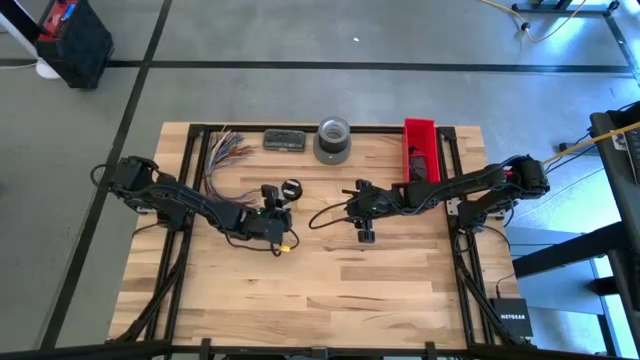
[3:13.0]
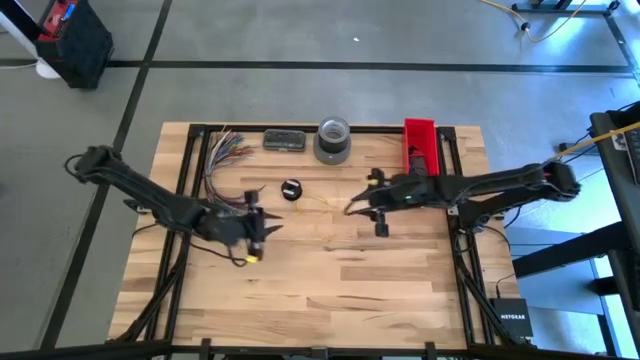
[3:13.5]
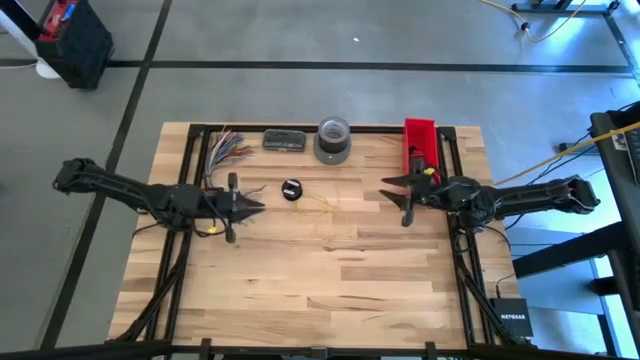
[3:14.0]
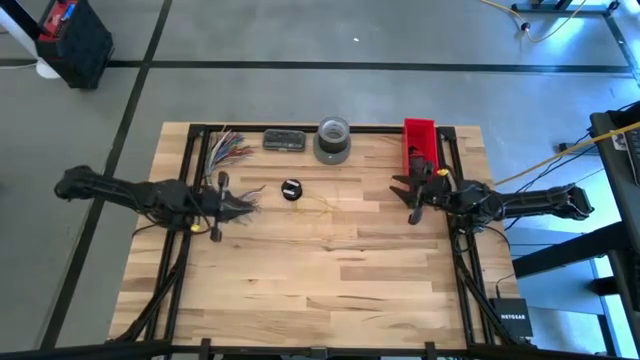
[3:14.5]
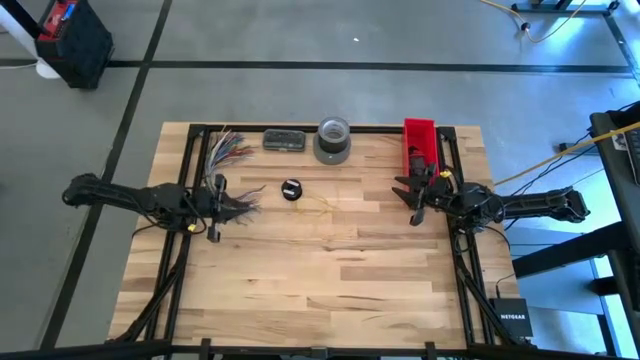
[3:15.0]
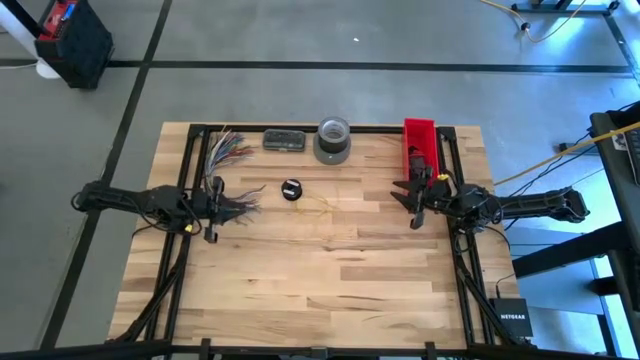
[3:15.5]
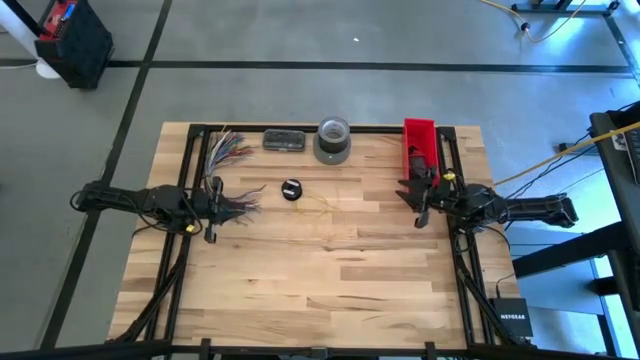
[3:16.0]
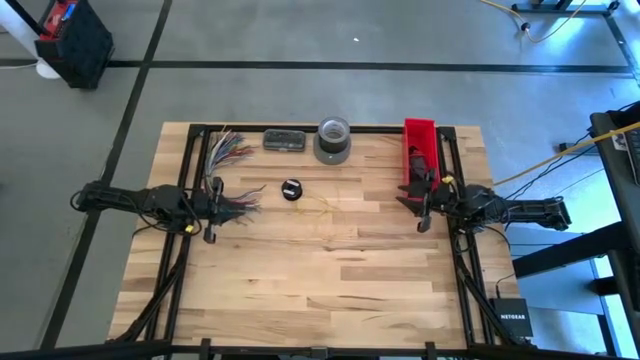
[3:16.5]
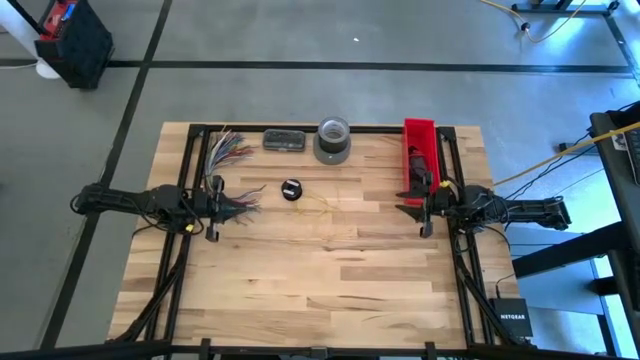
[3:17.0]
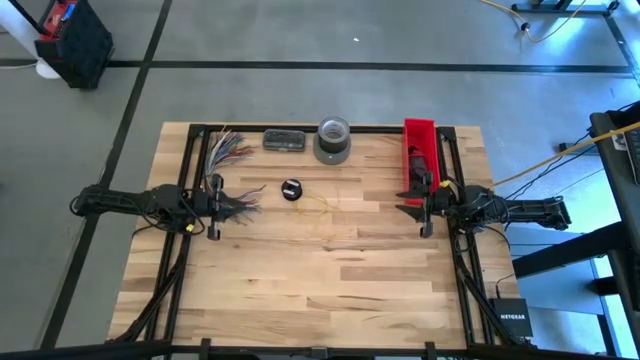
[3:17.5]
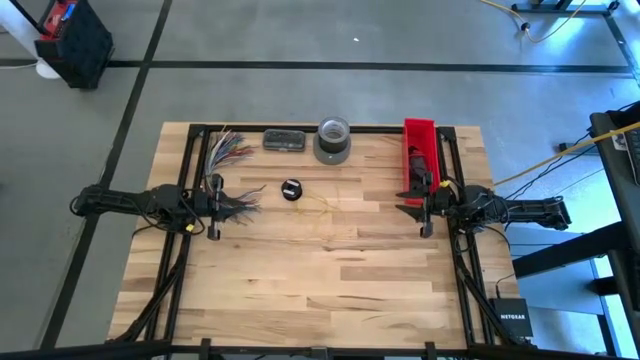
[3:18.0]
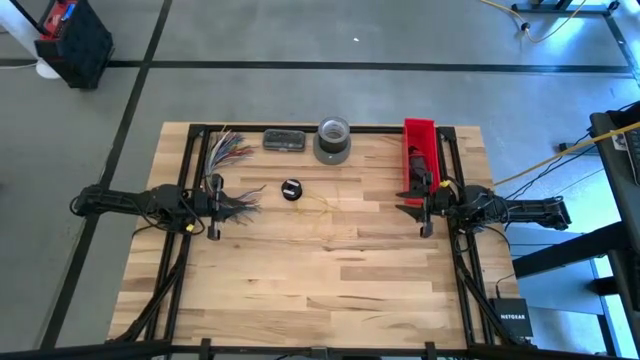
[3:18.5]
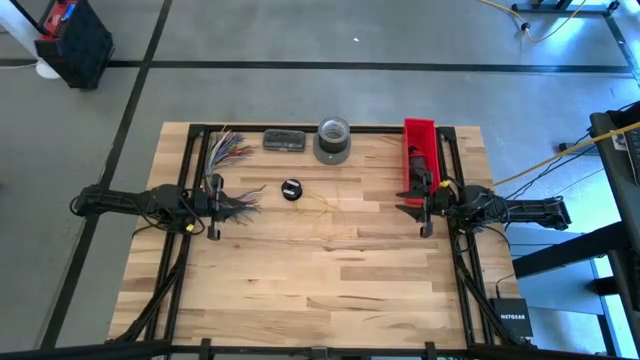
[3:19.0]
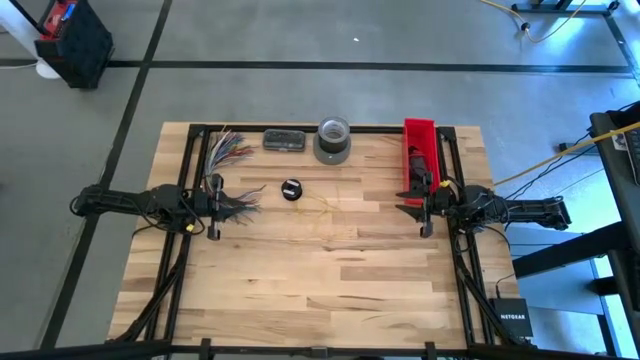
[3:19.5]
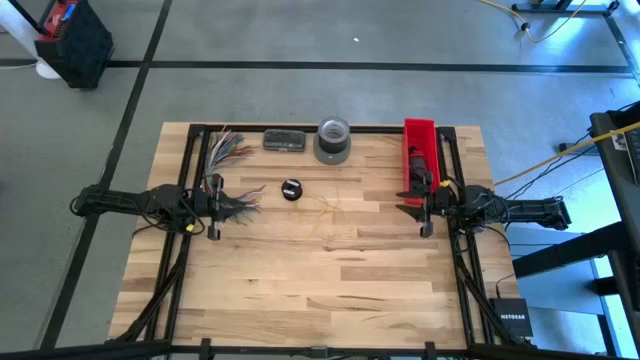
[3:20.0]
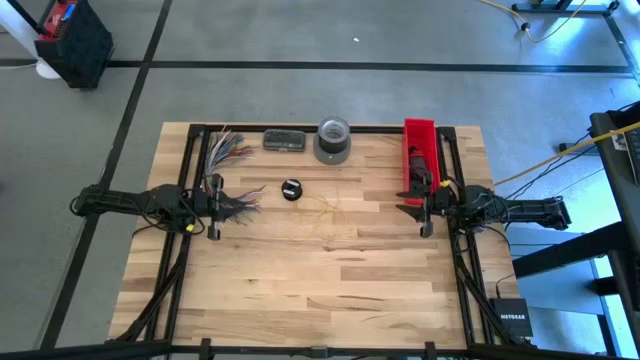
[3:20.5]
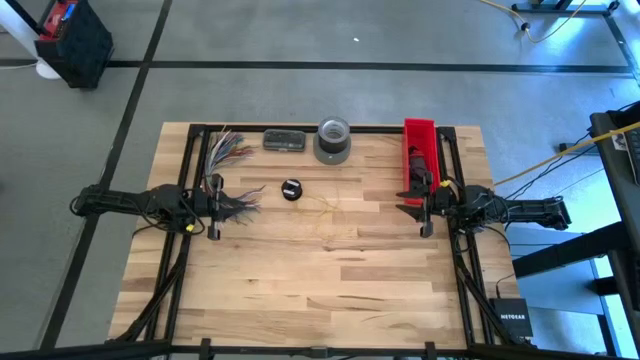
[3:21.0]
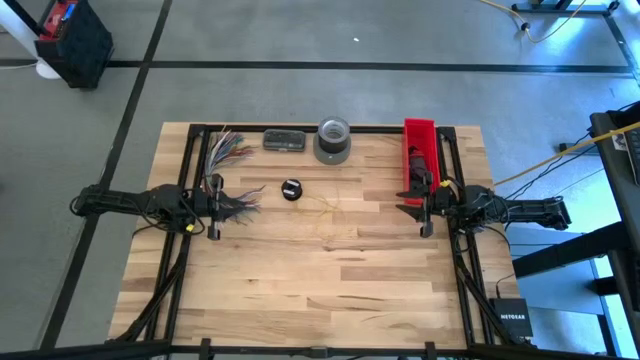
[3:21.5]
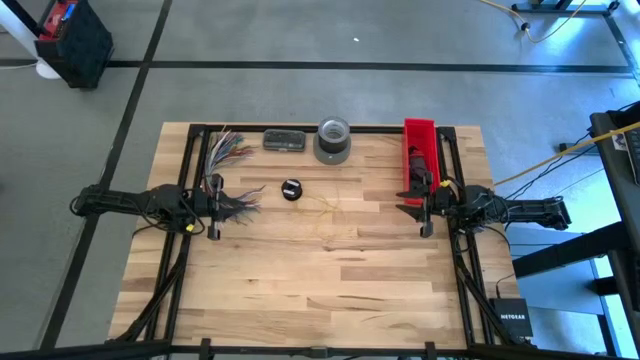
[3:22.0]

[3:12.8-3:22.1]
Task: Coil cords
Return to Home Position

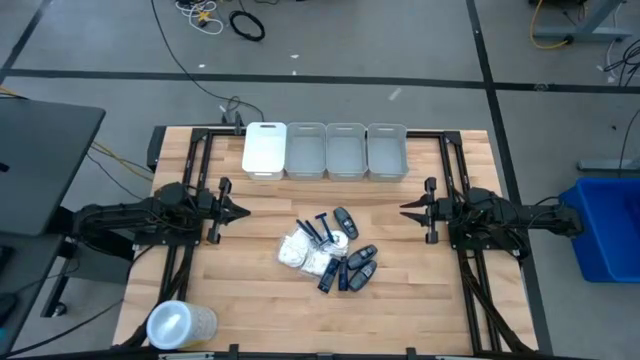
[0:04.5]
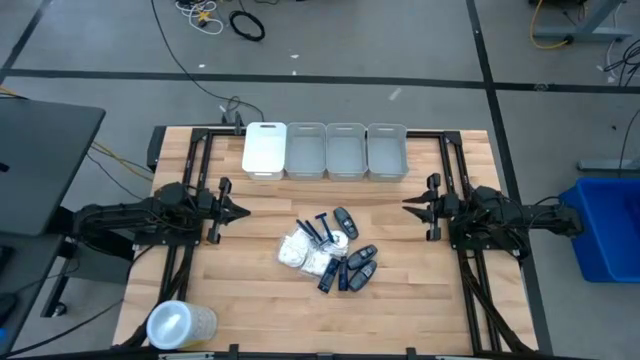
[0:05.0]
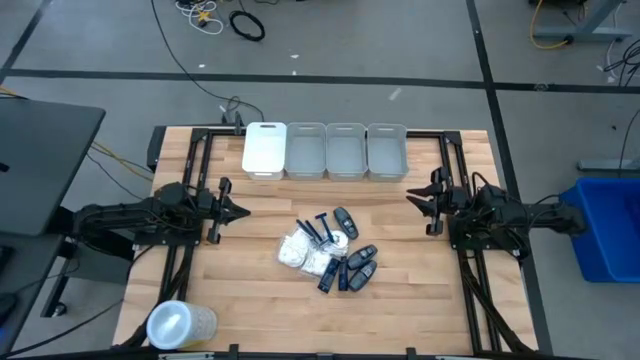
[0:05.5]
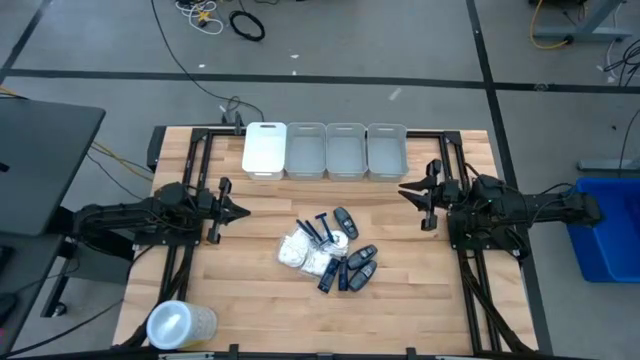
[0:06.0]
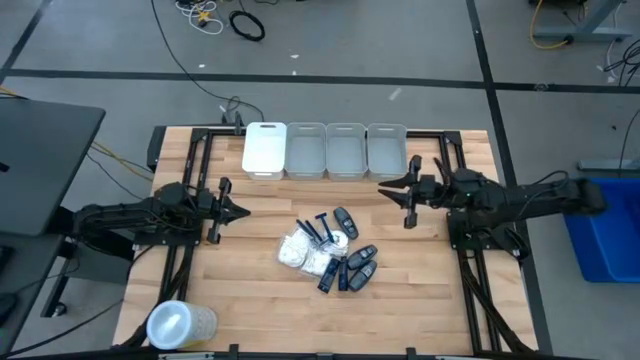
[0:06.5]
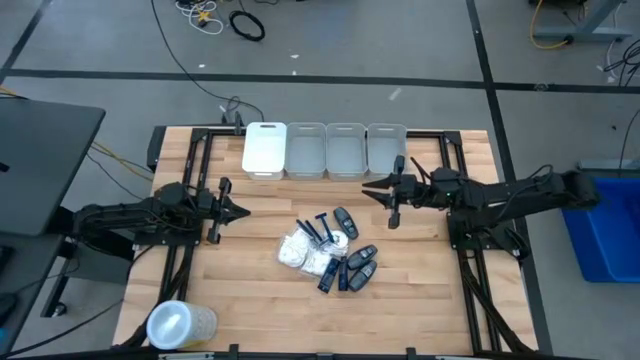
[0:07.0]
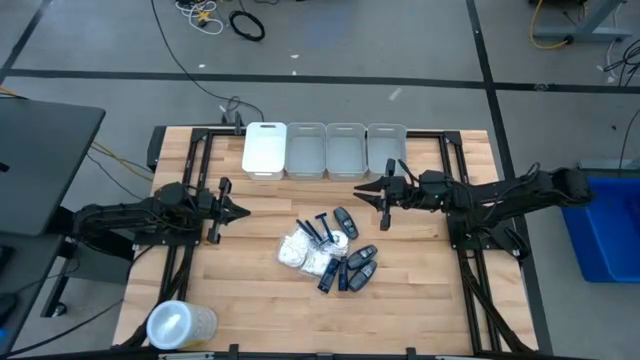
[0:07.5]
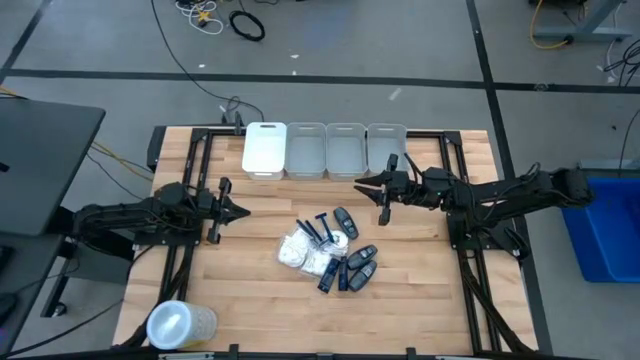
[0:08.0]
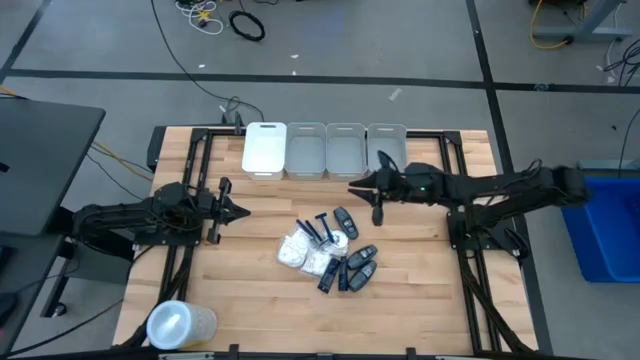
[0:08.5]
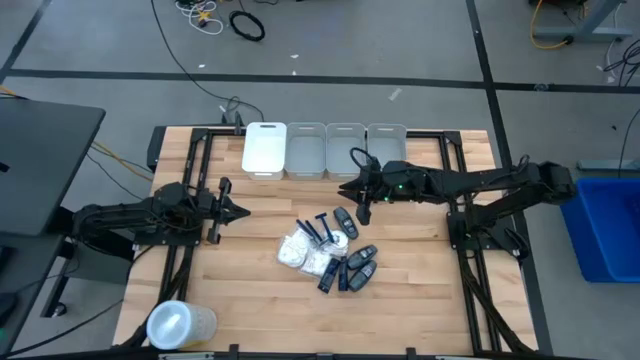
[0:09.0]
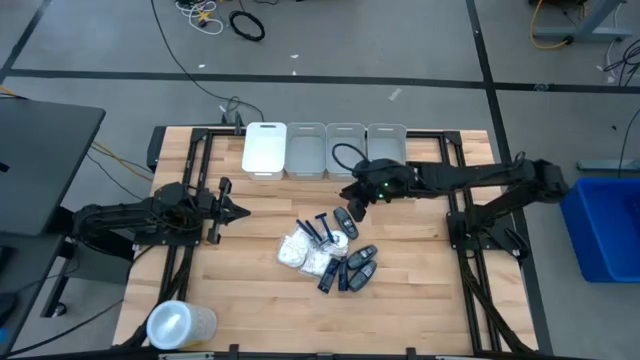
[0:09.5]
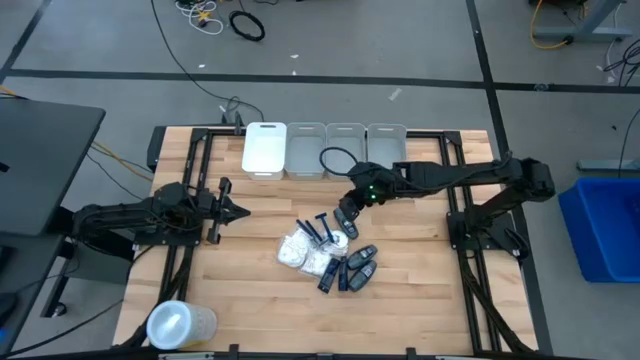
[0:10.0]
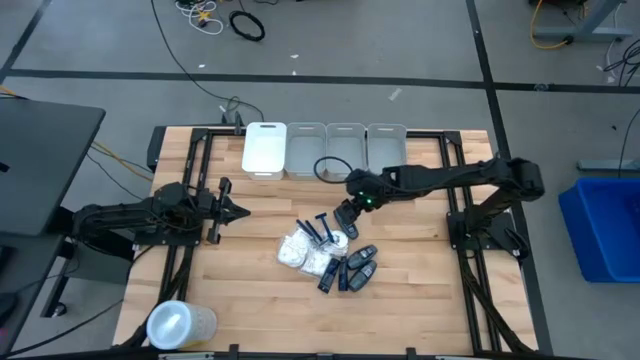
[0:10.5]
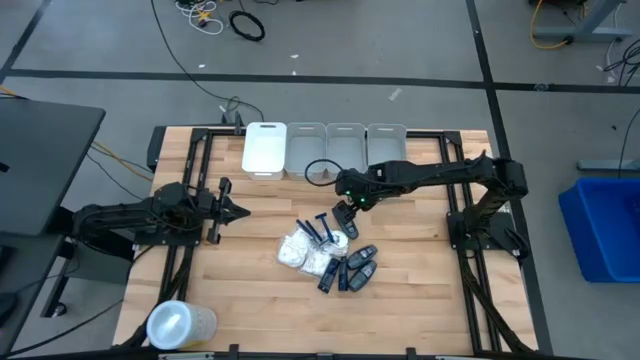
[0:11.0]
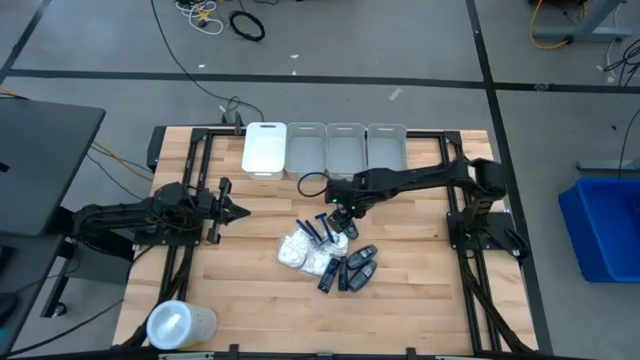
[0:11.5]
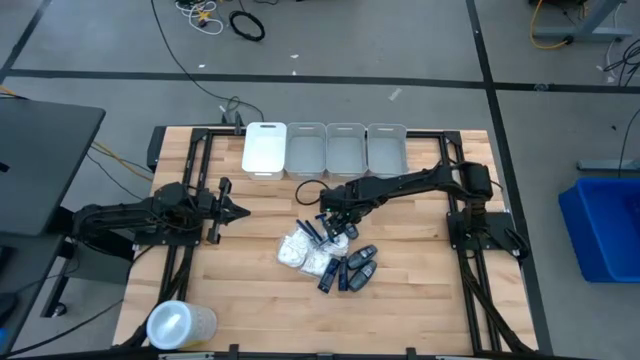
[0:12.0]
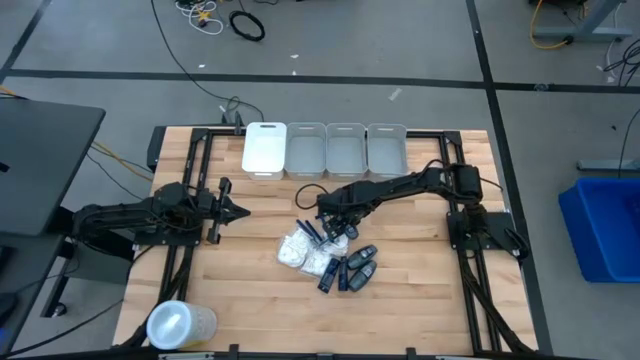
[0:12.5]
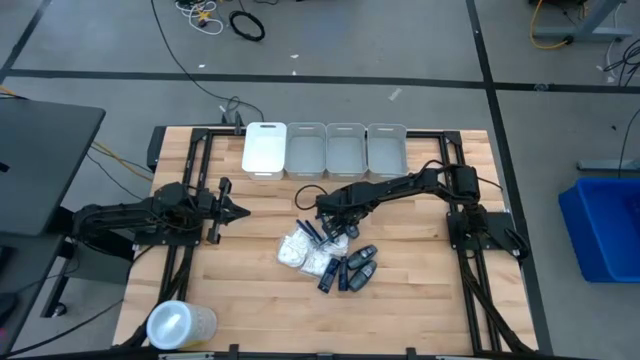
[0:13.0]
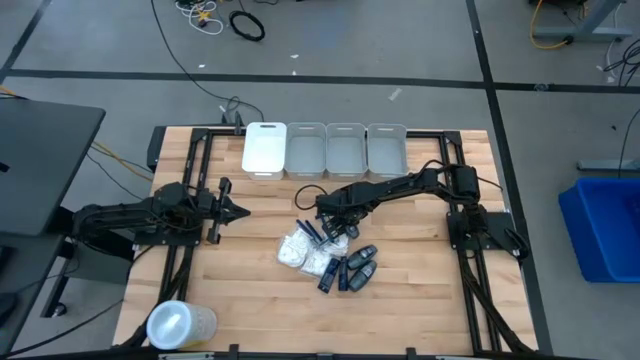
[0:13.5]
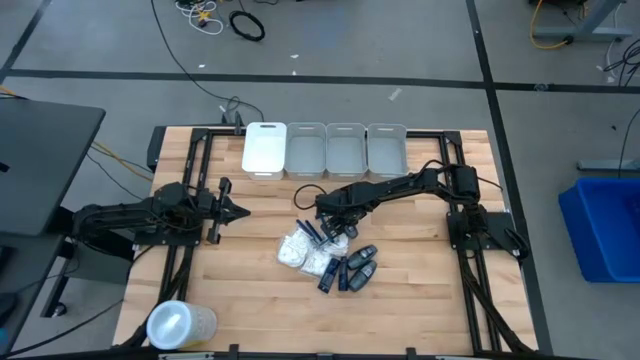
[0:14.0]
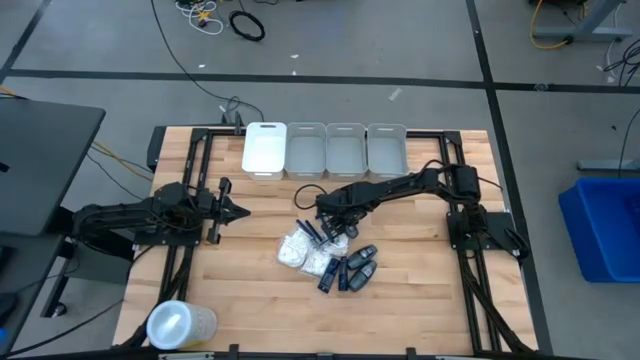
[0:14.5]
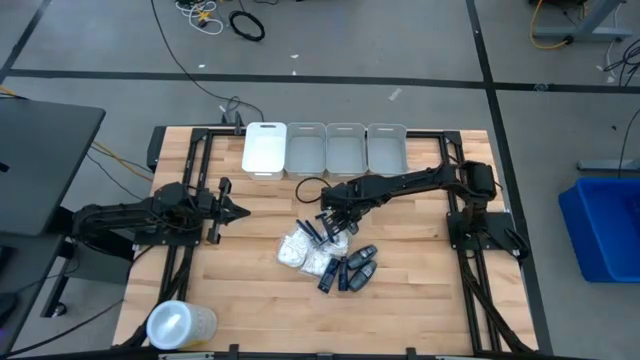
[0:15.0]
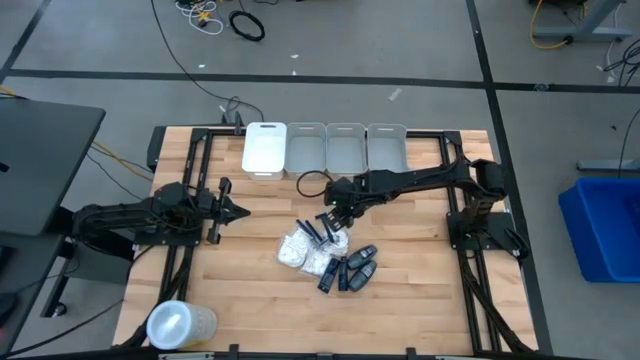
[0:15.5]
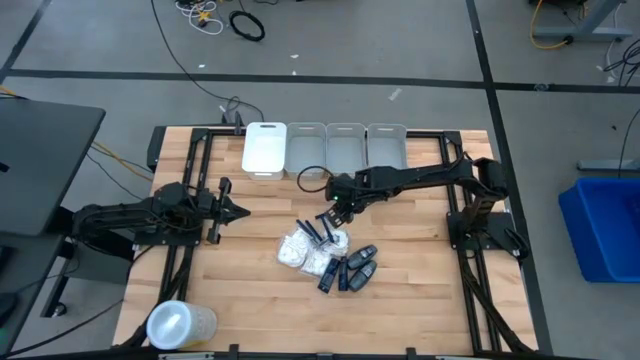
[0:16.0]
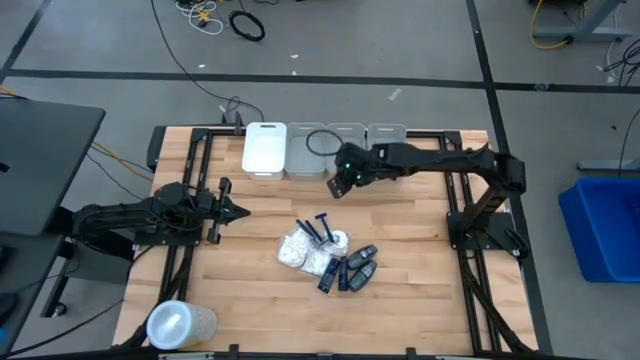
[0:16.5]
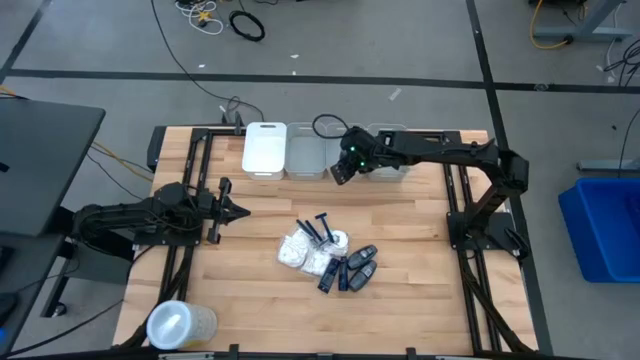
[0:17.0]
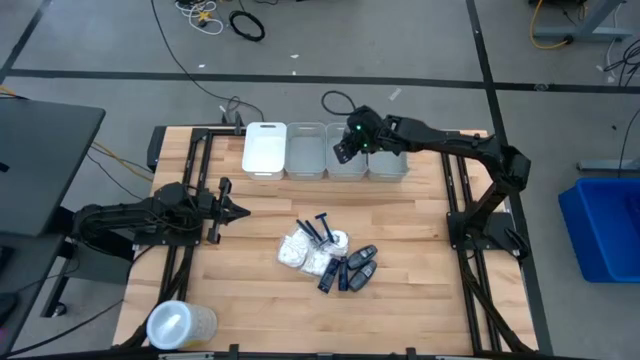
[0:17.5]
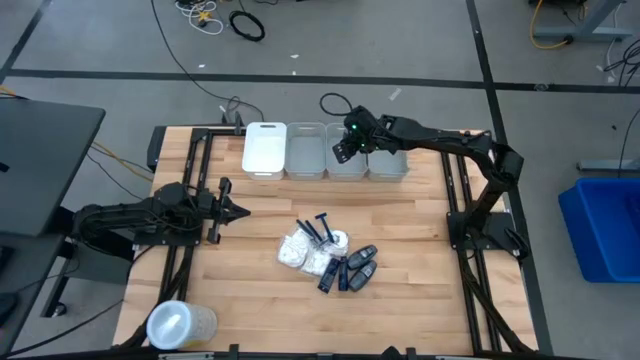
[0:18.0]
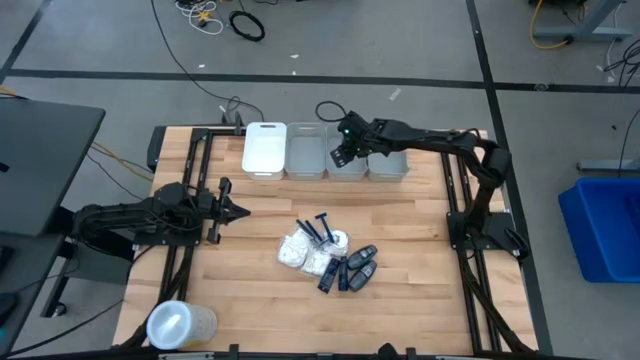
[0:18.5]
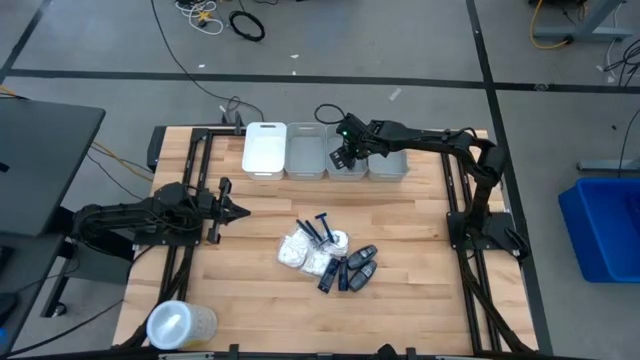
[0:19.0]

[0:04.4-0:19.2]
Task: Pick & Place Travel size toiletries
Put the gray deodorant into the middle gray bin
